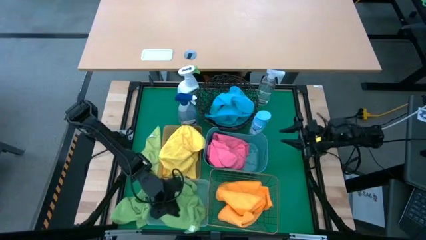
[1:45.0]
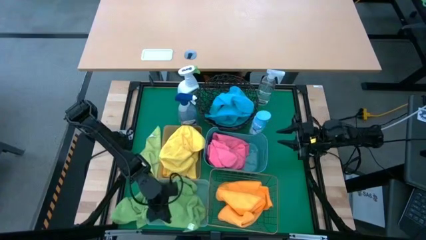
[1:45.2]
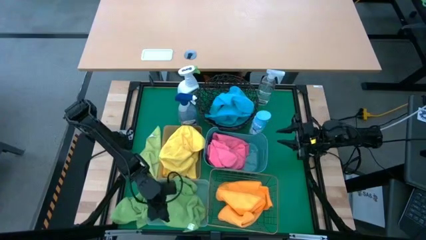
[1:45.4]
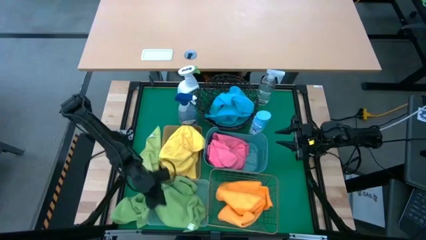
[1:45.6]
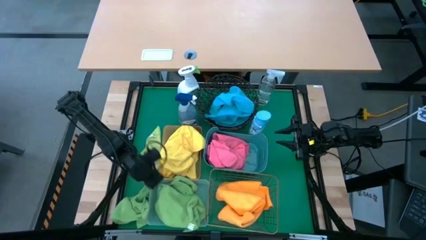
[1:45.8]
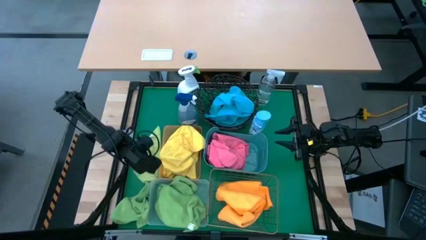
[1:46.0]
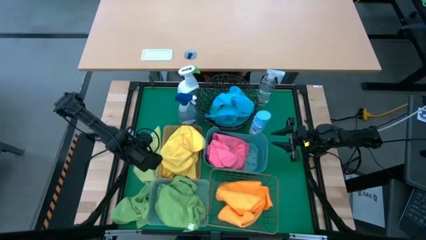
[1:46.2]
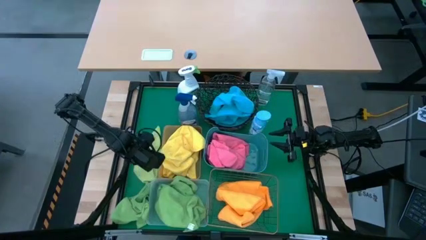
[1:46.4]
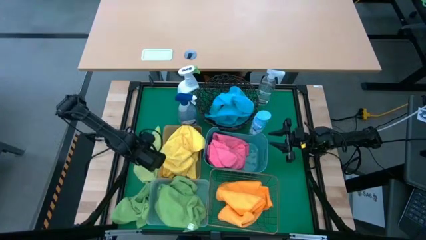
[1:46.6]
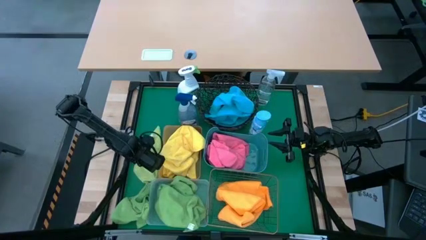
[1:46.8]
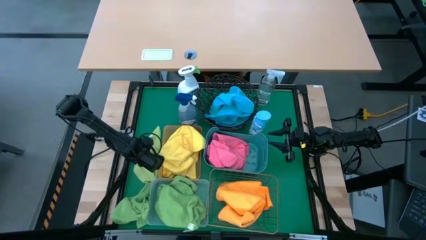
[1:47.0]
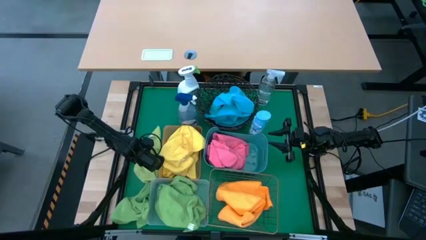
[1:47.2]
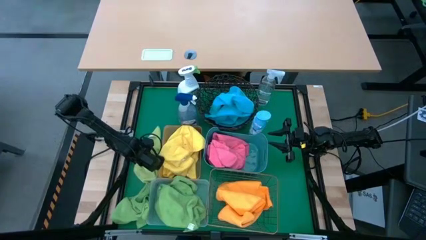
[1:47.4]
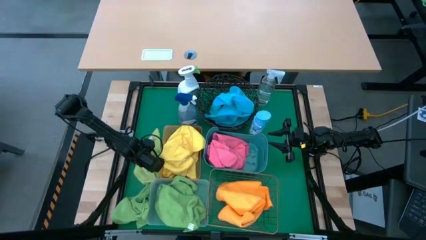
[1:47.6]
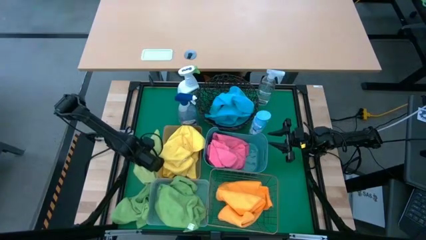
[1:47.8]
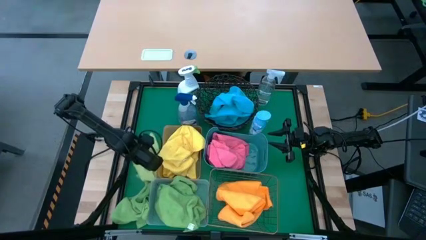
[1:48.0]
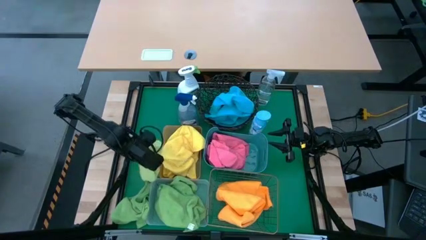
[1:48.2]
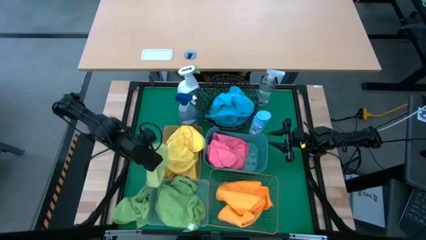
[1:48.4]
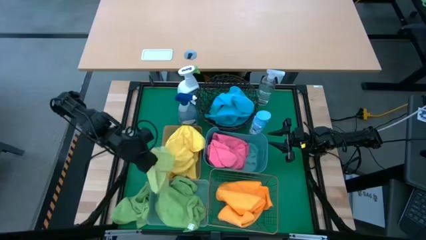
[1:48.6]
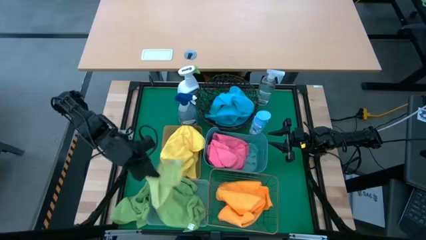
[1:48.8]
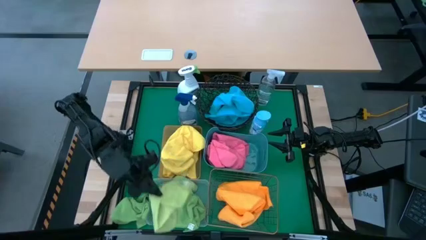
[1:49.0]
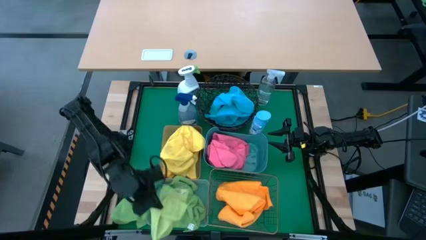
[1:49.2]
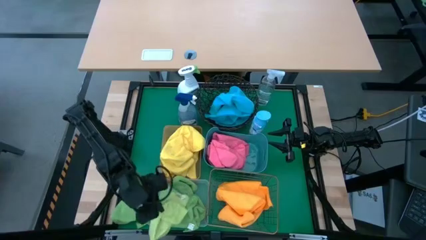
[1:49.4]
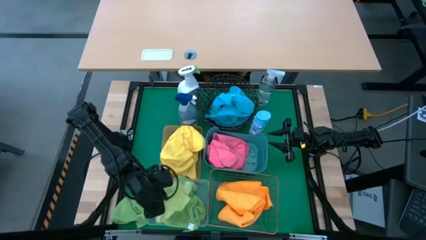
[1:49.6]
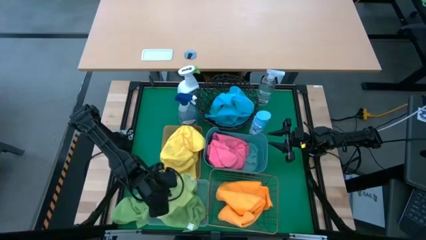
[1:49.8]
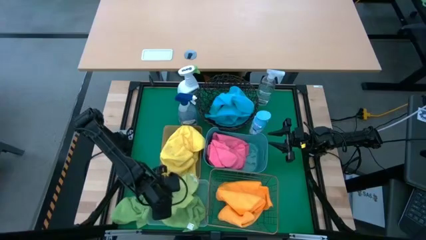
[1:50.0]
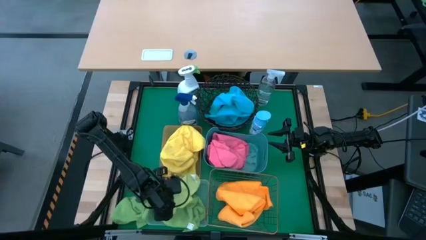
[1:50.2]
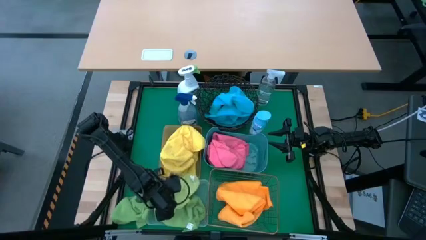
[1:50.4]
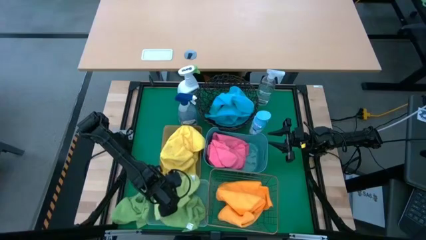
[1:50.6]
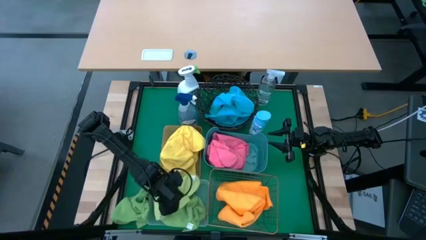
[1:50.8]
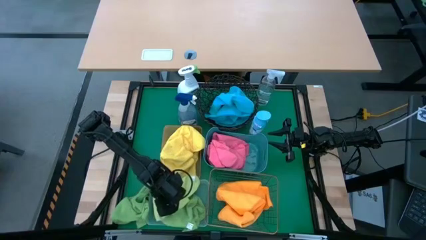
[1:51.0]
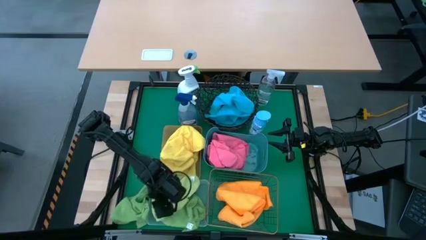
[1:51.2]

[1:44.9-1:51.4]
Task: Sort microfiber towel by color & place in baskets
Put the light green towel into the white bin

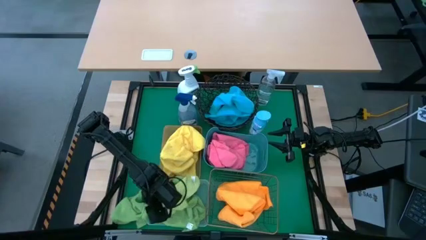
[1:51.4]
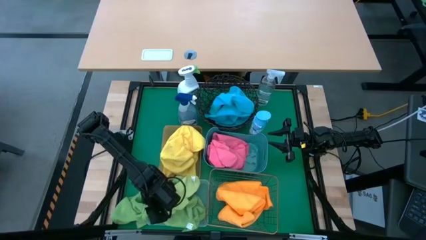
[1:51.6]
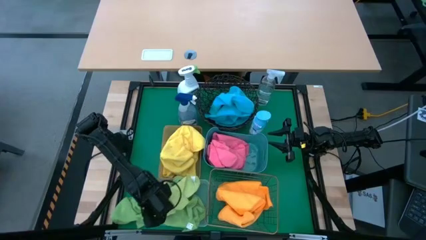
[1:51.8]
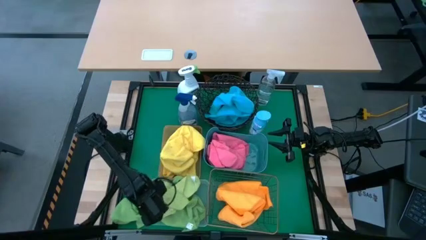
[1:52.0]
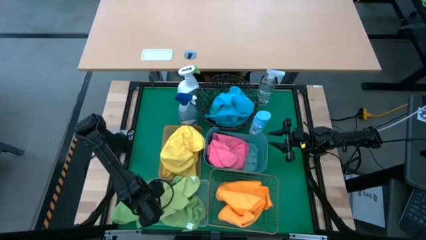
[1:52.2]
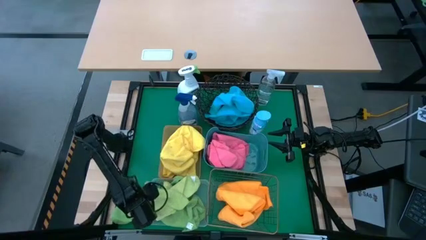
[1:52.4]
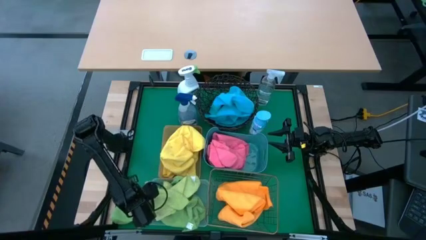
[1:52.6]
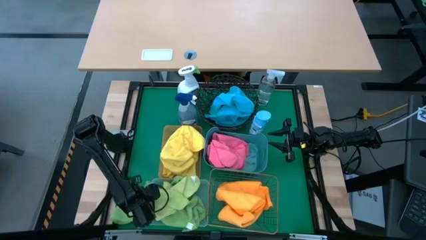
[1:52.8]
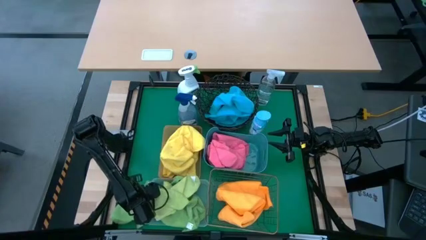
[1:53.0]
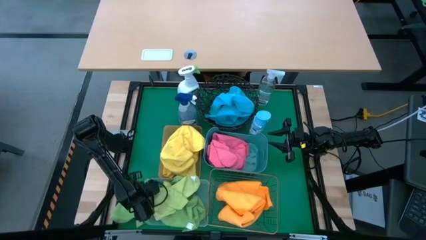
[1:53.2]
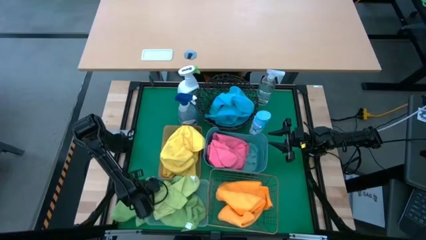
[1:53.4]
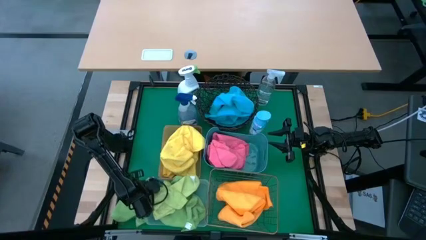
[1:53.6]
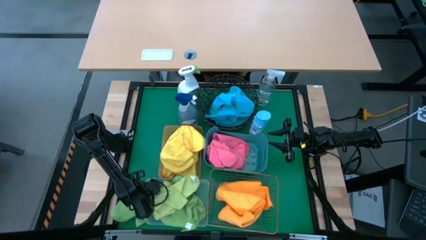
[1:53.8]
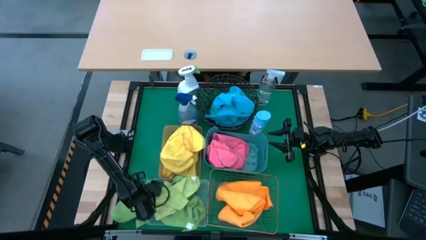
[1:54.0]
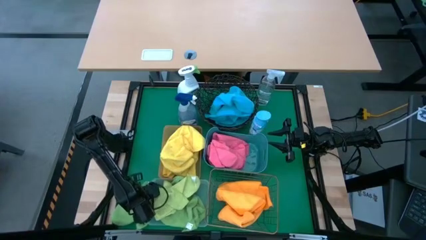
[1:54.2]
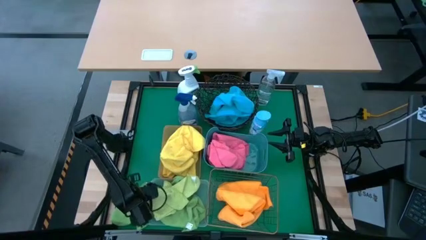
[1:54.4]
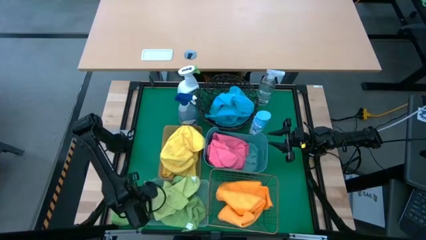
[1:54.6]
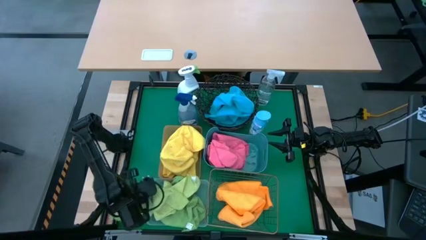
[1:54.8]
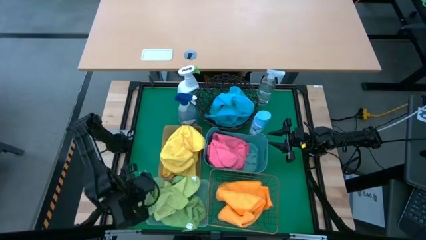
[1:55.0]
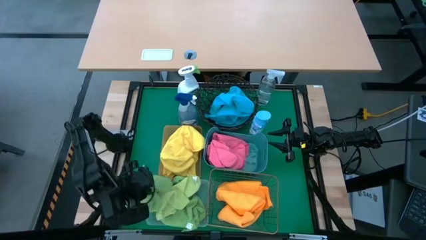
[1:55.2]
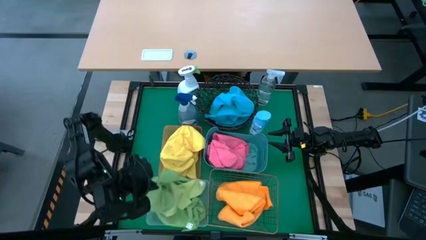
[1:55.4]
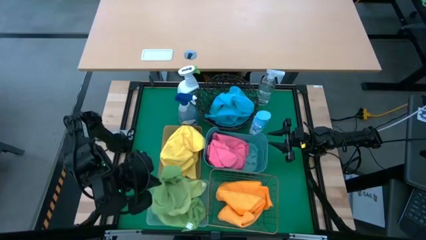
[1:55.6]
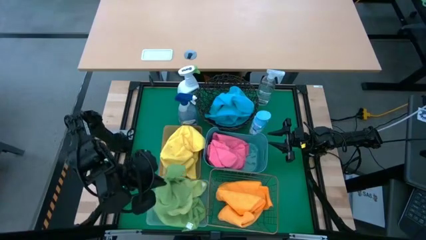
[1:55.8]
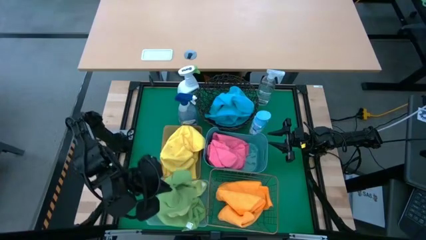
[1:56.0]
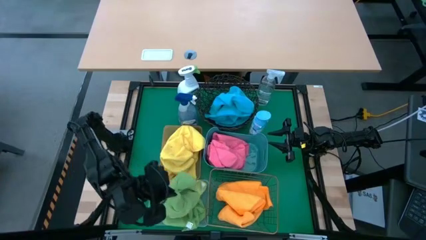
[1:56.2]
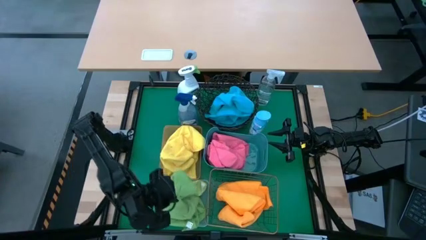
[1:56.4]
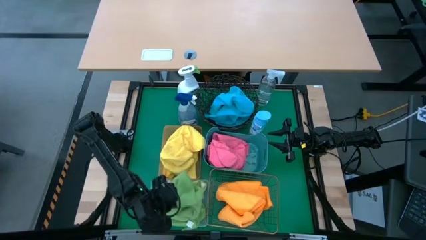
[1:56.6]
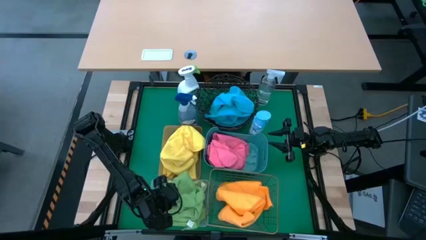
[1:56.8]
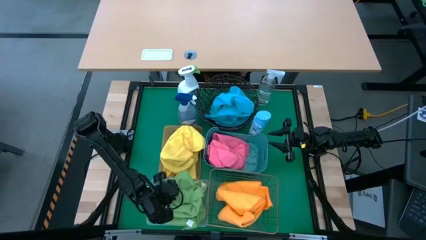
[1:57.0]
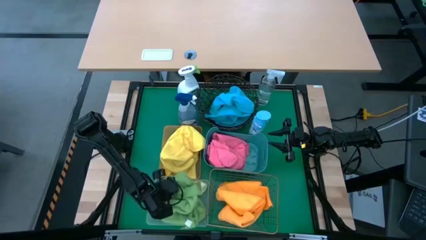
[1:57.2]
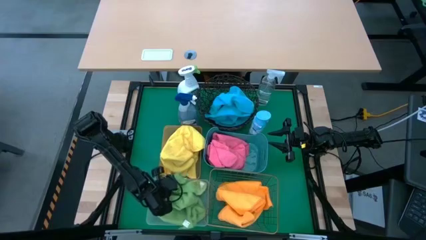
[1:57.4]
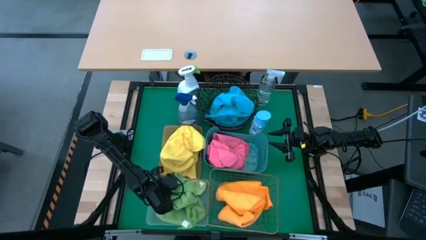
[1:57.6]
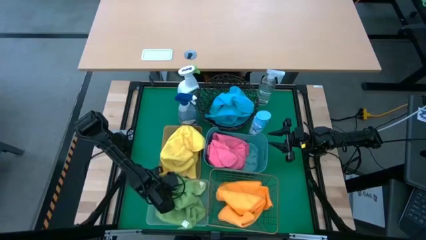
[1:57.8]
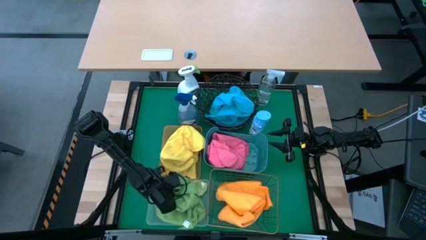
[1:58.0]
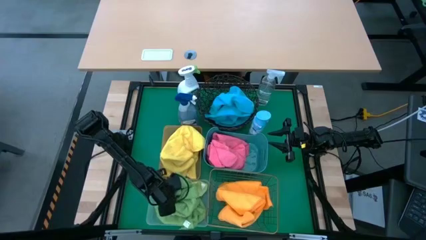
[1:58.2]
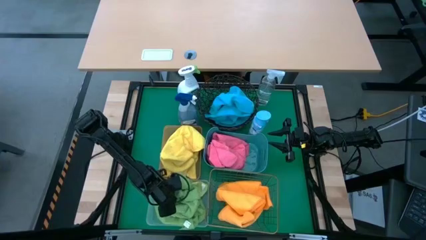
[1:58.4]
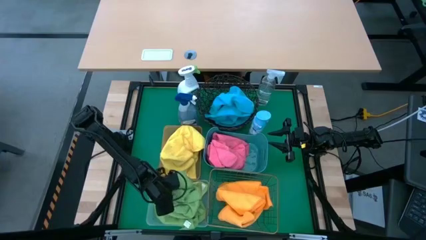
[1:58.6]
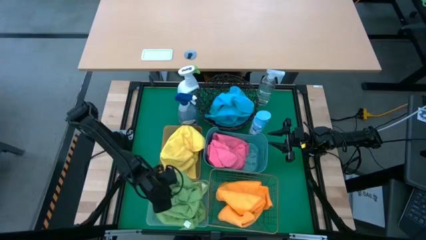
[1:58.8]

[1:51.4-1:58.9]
Put the green towel into the white bin

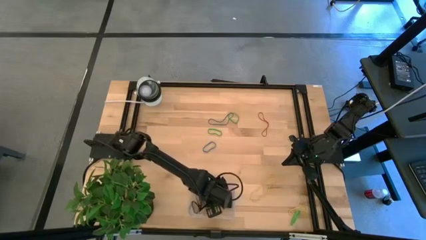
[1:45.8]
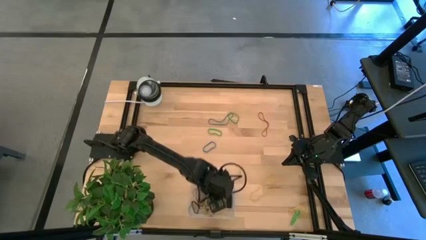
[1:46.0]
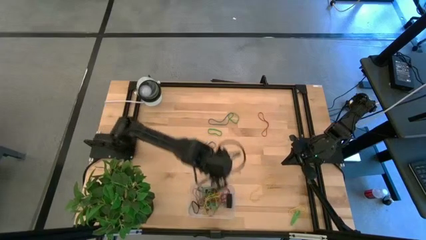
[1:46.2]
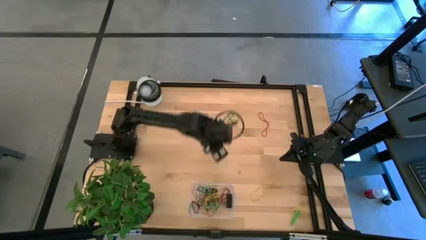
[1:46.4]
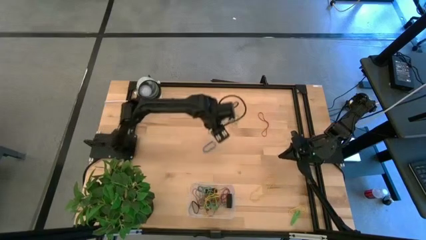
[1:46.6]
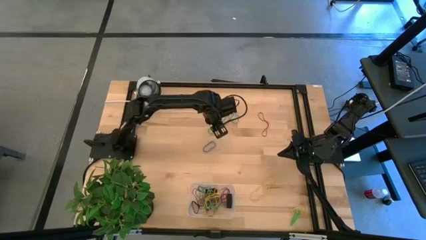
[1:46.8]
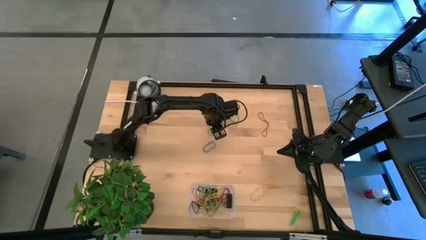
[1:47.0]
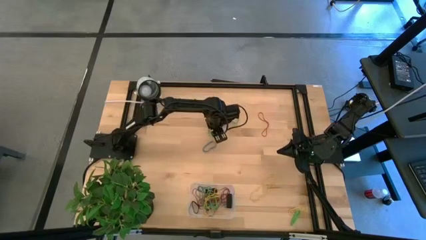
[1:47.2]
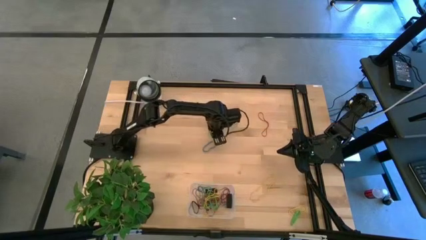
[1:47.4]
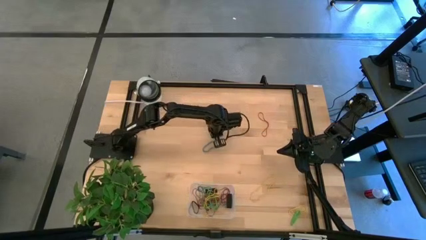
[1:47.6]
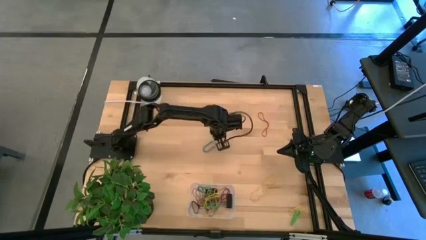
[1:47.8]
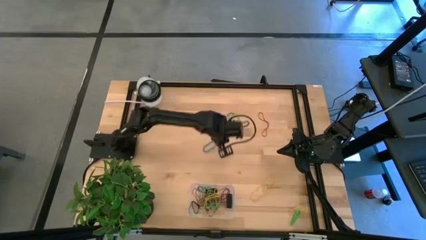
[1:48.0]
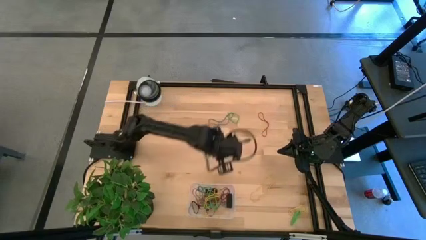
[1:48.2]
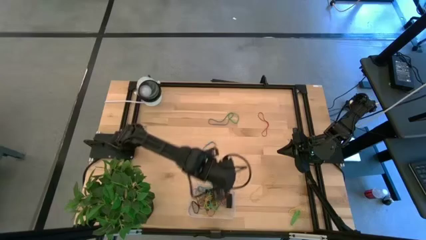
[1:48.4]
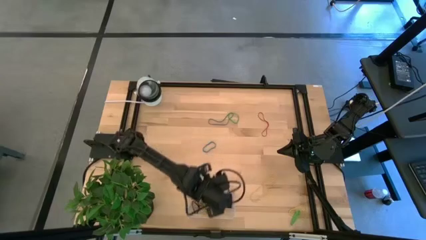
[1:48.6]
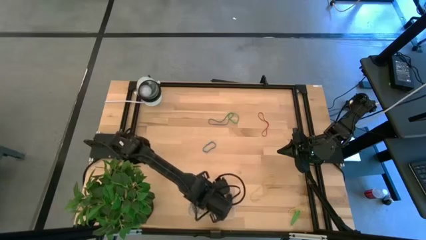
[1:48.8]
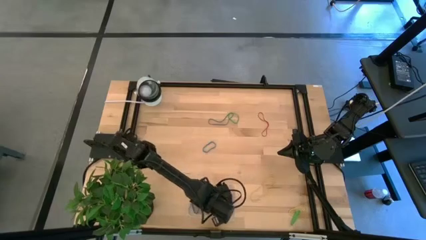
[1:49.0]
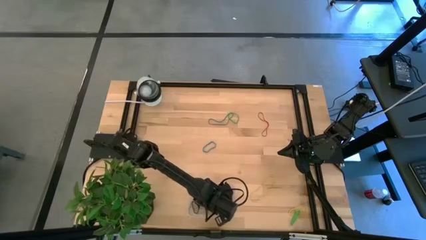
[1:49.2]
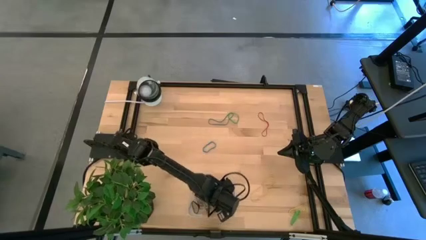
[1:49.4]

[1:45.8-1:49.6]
Task: Pick and place rubber bands into bin
Put the green rubber band into the transparent bin
